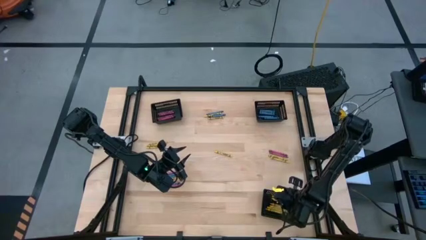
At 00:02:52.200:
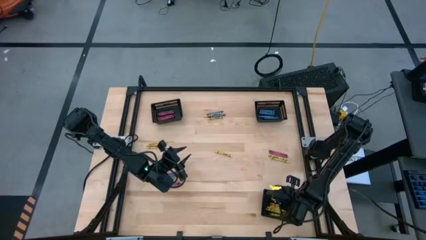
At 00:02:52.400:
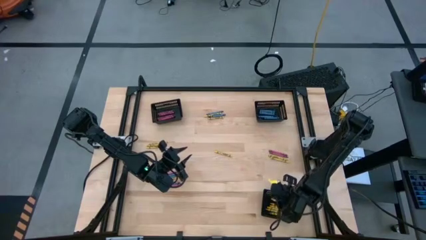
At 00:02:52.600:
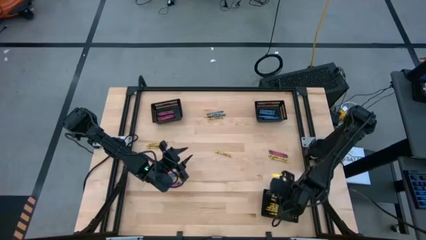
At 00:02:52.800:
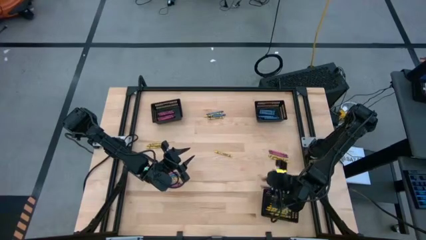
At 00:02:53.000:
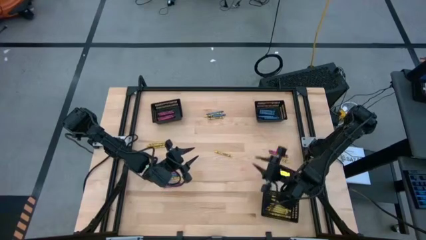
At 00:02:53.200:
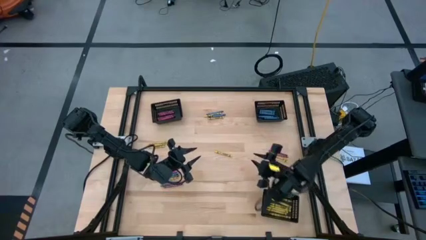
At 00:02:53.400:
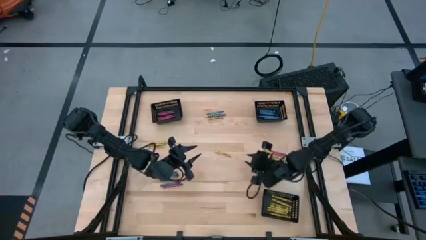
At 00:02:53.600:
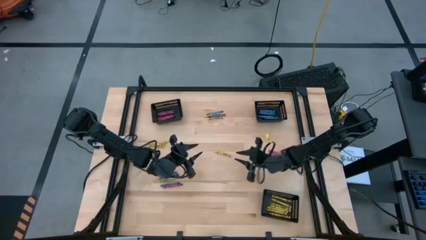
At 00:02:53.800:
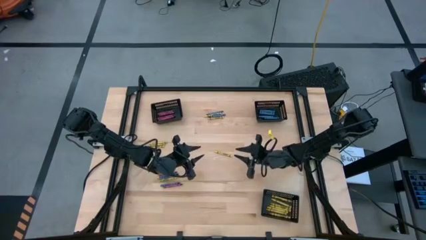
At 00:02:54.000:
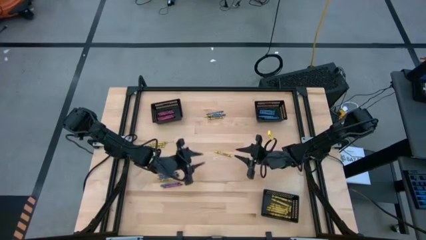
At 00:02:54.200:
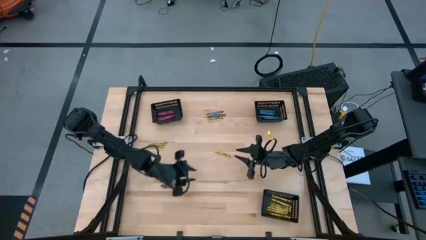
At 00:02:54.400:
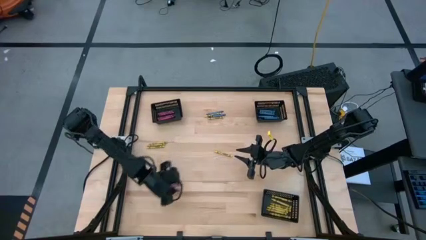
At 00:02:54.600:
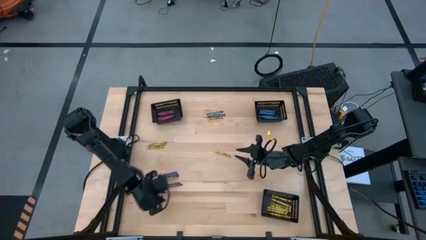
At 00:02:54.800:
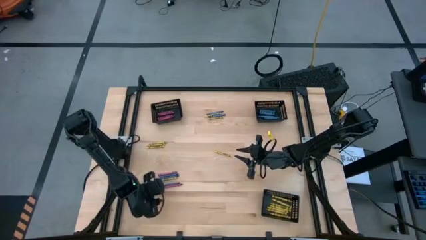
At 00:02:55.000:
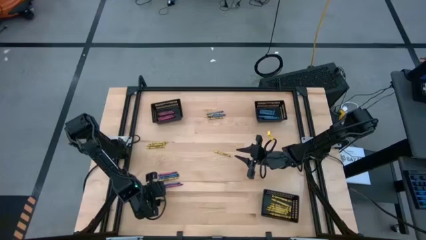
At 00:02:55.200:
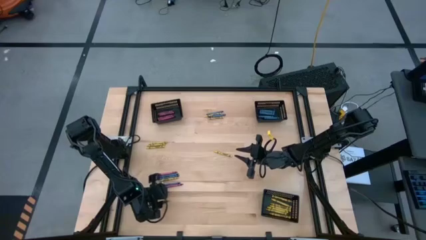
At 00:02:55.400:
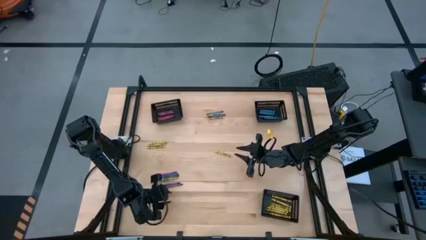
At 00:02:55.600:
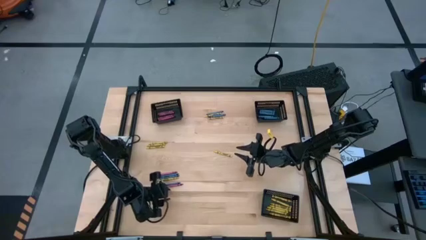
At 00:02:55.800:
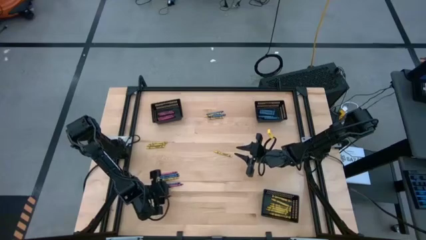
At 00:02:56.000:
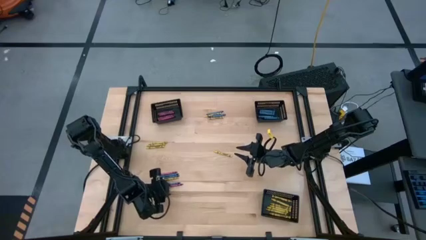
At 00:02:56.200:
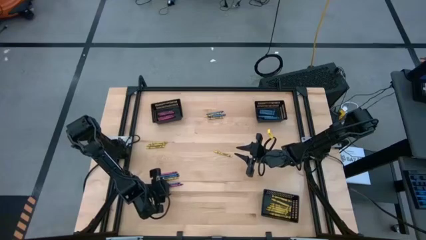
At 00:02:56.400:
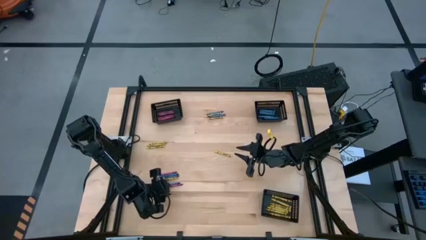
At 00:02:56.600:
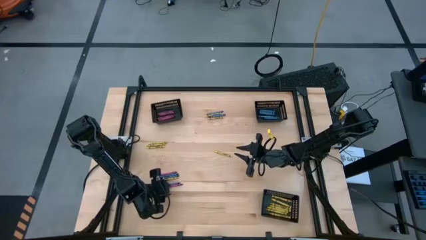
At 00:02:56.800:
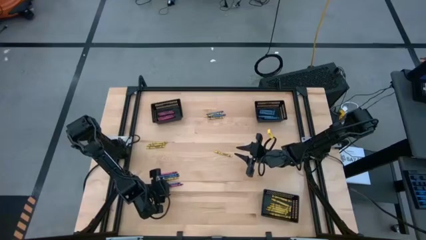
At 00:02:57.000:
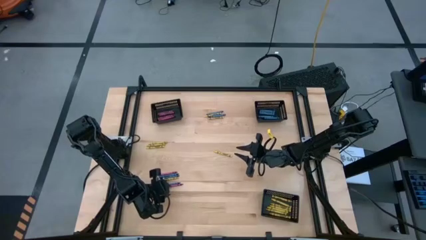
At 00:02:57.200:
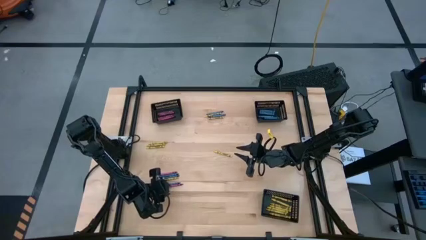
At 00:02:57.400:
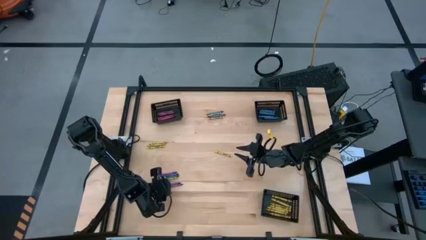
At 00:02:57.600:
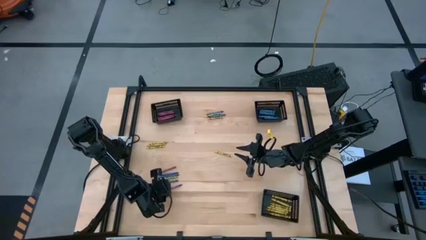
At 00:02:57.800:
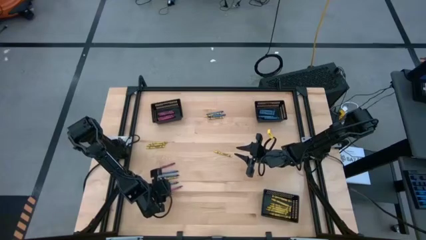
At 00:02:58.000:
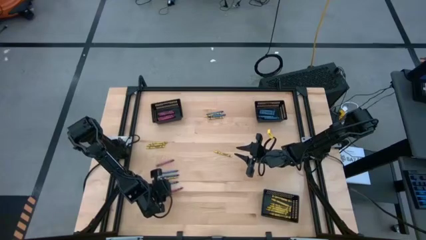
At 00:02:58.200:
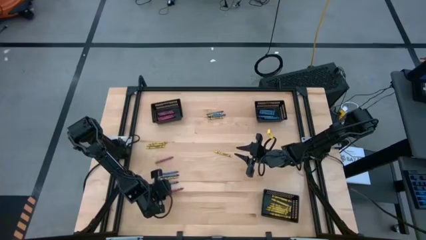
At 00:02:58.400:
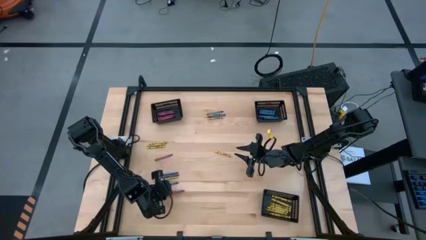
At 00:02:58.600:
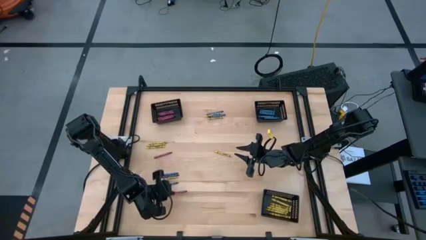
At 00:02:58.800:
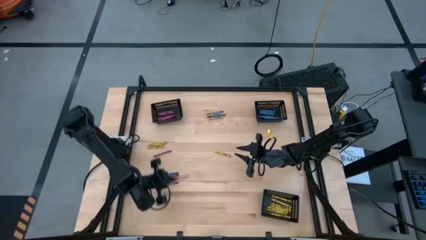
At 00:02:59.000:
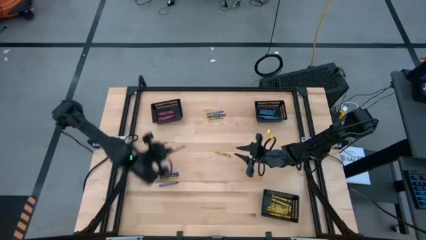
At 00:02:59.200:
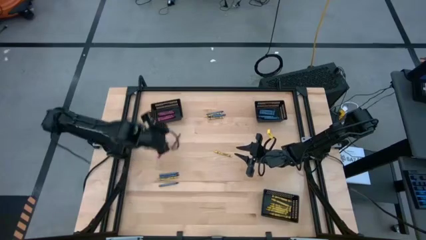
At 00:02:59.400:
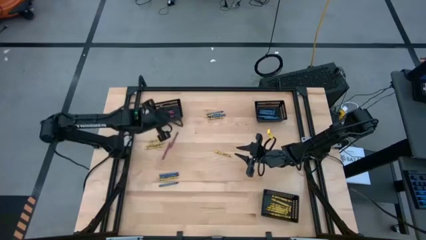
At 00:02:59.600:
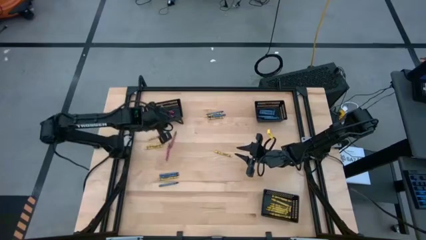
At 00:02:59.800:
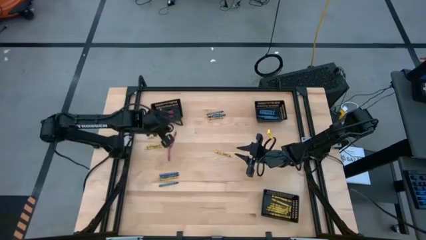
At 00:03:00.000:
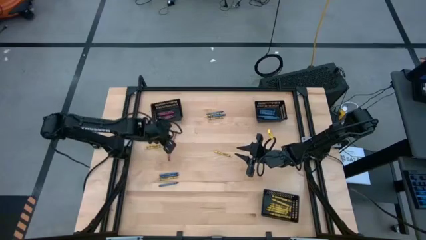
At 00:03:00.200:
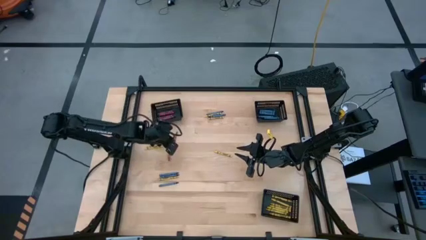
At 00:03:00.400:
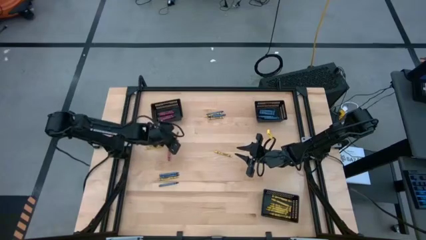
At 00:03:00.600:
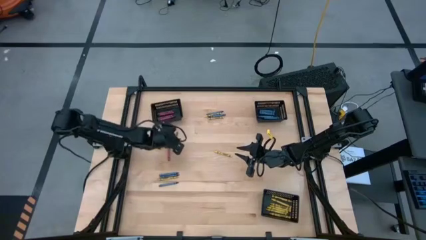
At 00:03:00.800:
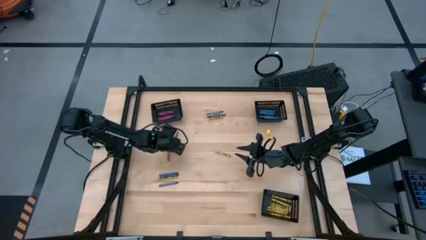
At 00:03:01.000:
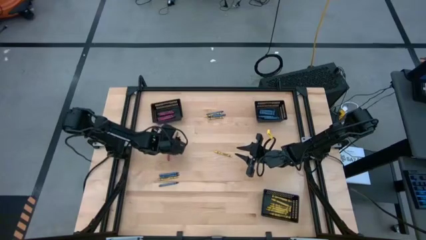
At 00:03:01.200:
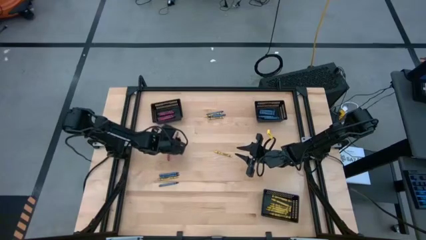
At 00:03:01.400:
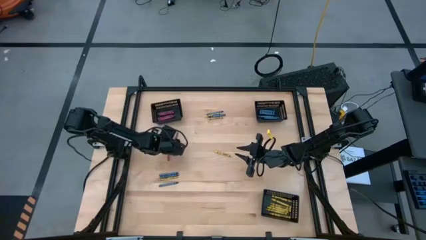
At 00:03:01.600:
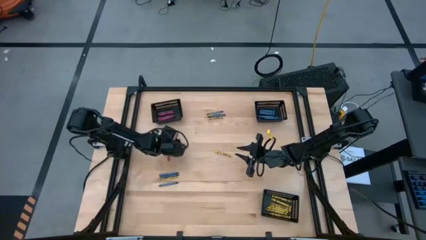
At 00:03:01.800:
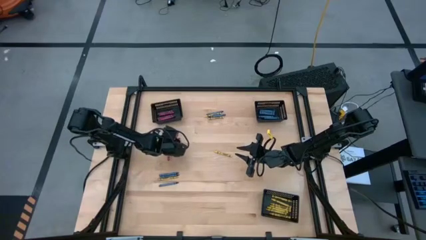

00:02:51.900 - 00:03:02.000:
Task: Sort crayons
Put the red crayon into the top left black bin

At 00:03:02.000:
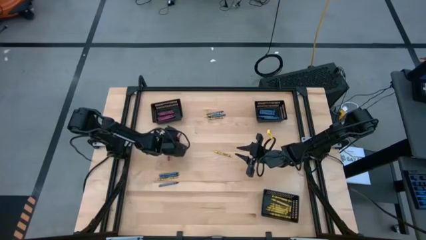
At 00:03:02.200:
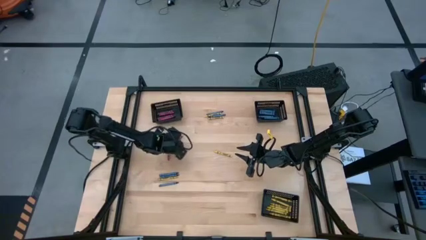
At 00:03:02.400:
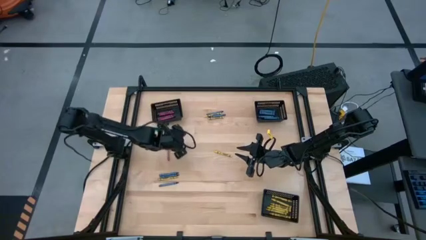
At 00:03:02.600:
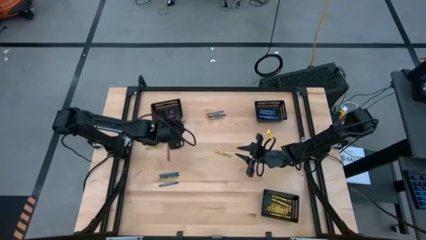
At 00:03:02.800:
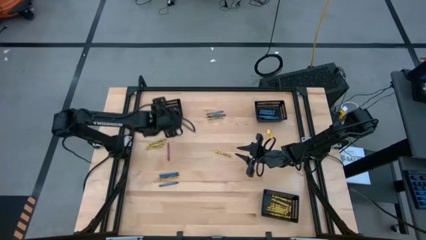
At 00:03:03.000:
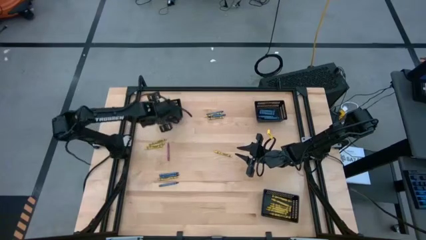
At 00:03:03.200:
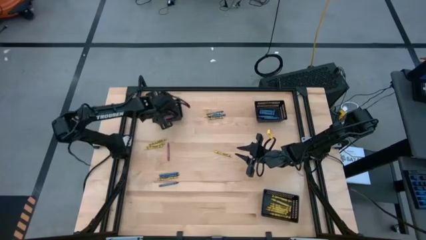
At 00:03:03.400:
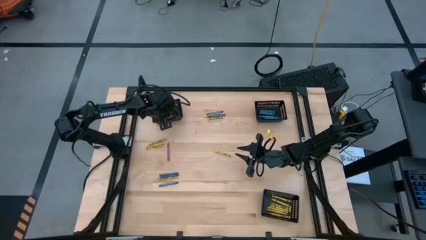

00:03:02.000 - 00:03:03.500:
Put the red crayon into the top left black bin

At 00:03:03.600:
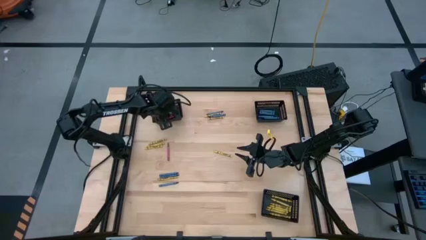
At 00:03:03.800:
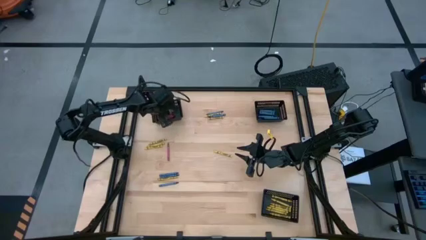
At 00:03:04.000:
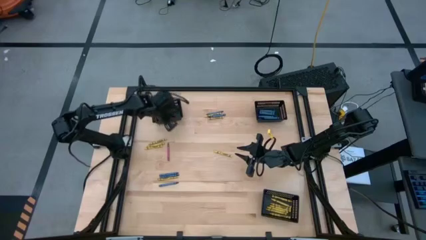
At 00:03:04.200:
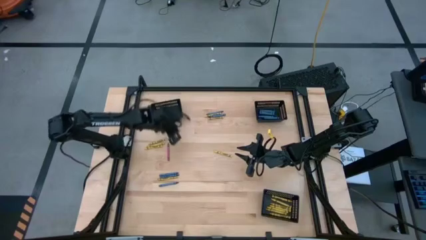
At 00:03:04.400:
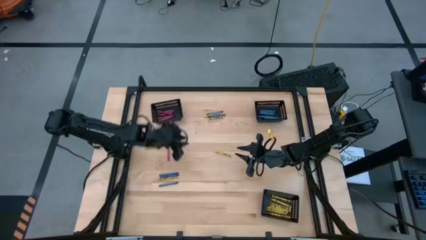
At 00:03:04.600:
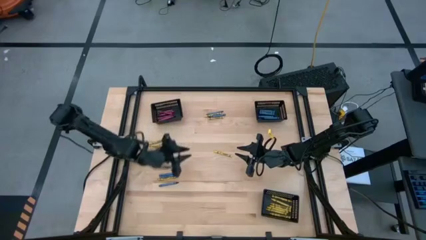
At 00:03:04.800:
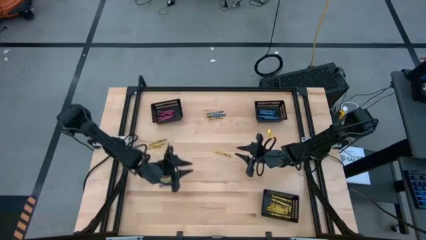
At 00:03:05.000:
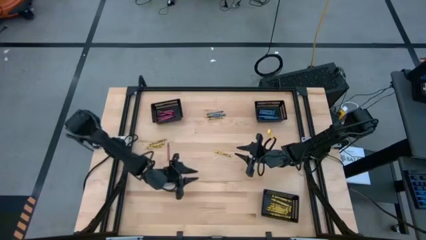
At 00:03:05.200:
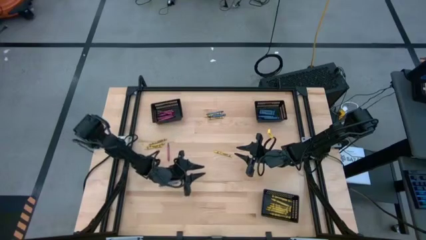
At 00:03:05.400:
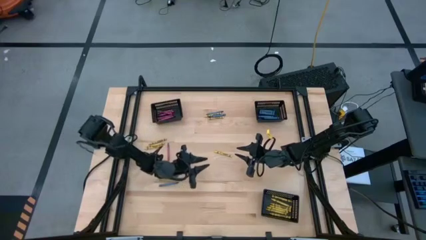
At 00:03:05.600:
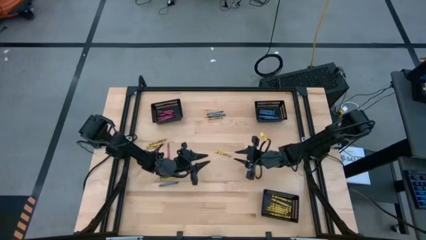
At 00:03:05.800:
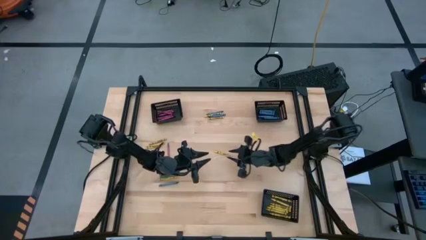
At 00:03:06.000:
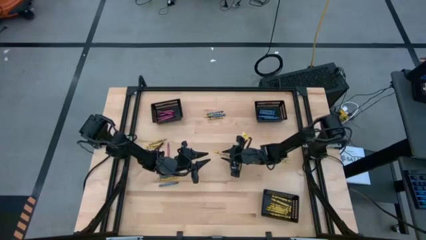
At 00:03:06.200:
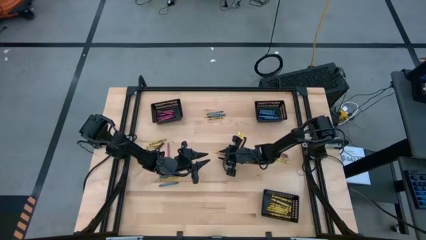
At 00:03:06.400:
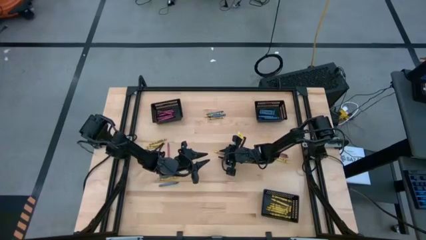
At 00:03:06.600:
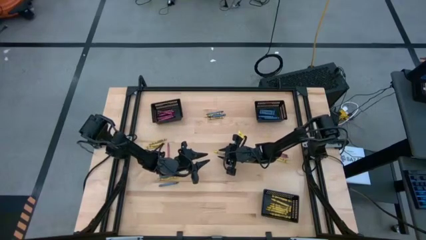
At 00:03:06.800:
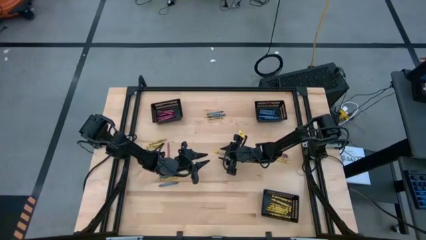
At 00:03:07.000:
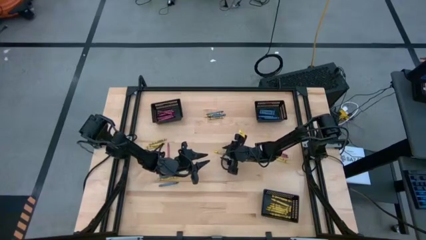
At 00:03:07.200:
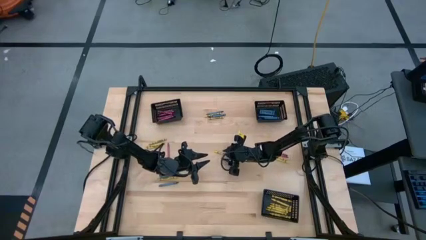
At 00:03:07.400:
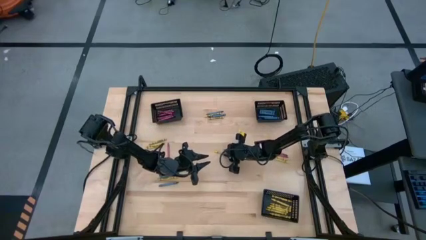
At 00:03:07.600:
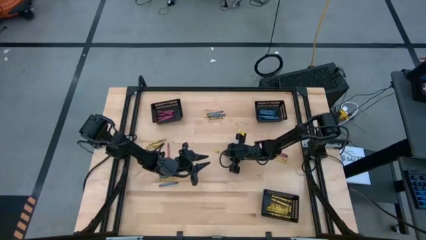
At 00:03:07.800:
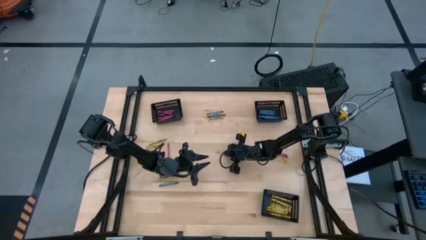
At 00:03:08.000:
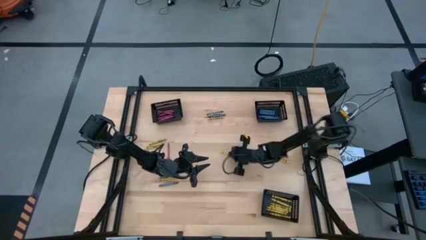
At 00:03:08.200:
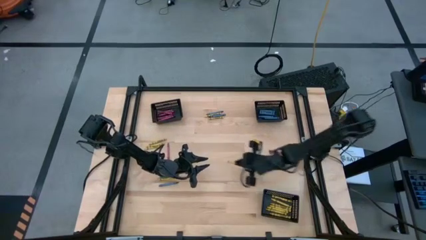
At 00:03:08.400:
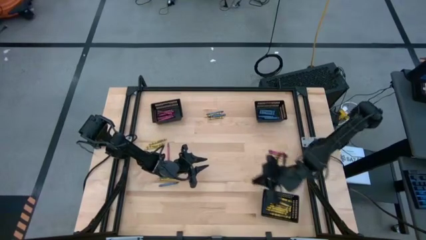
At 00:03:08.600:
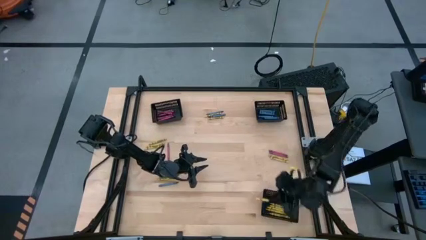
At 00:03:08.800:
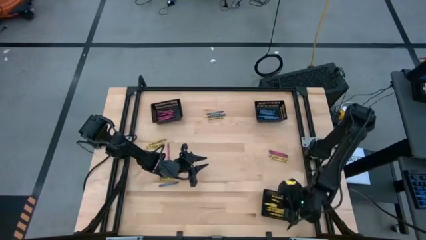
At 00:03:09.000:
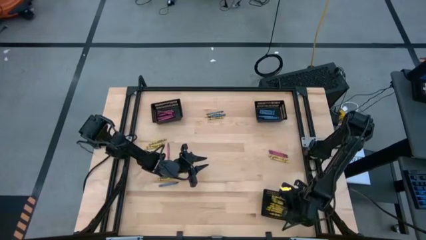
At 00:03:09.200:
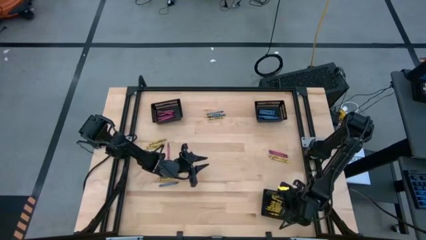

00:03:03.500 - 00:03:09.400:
Put the yellow crayon into the bottom black bin
